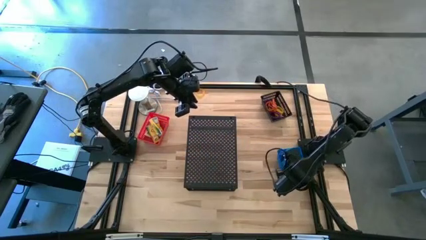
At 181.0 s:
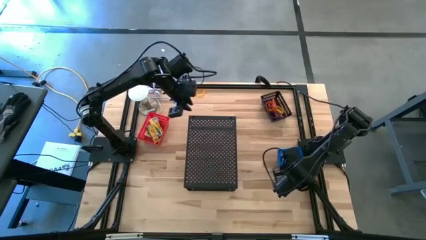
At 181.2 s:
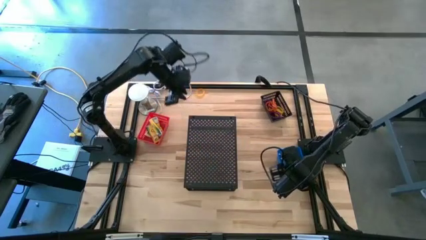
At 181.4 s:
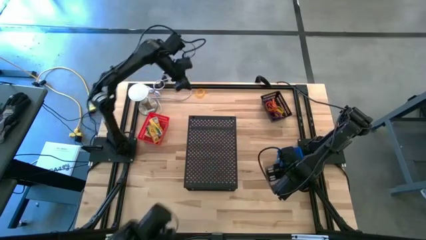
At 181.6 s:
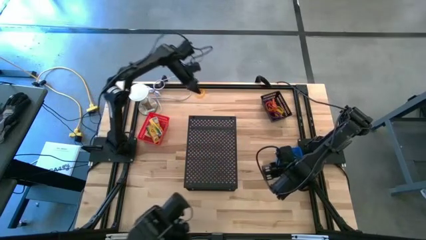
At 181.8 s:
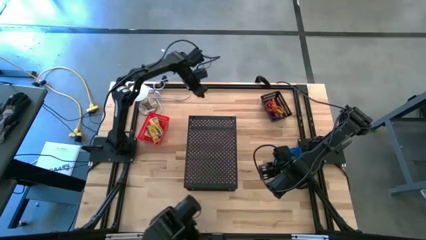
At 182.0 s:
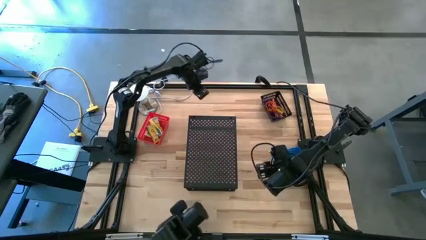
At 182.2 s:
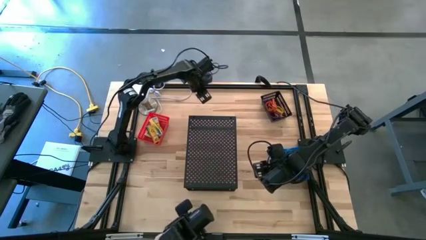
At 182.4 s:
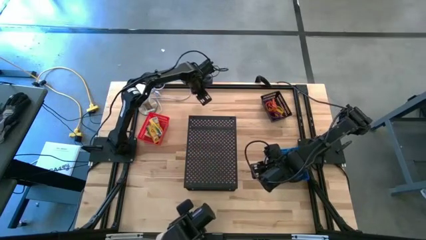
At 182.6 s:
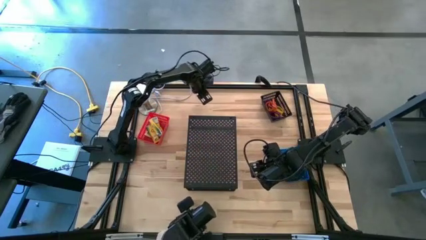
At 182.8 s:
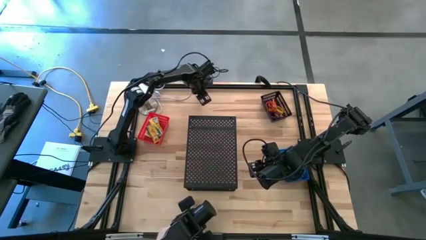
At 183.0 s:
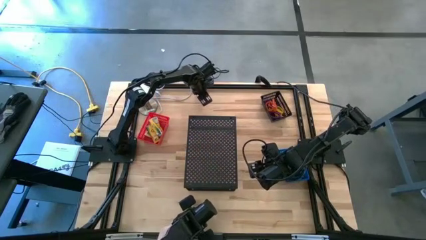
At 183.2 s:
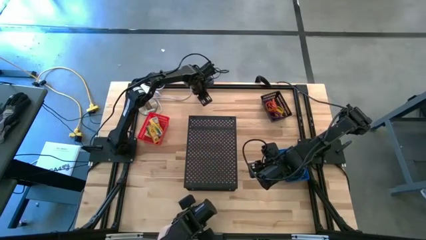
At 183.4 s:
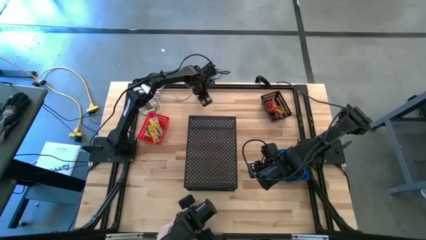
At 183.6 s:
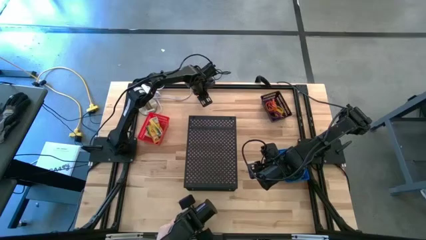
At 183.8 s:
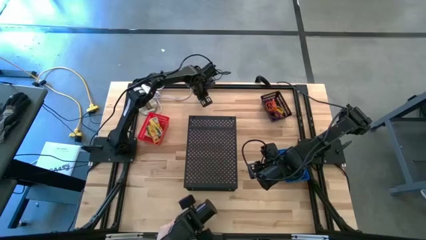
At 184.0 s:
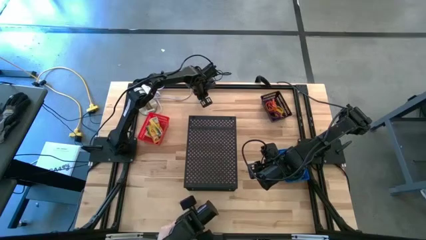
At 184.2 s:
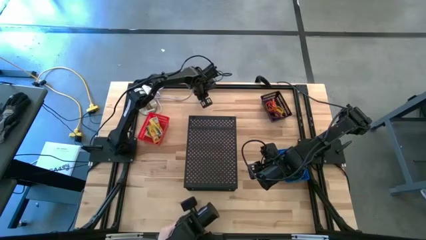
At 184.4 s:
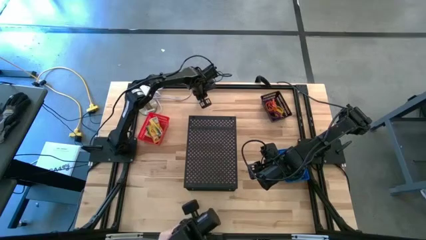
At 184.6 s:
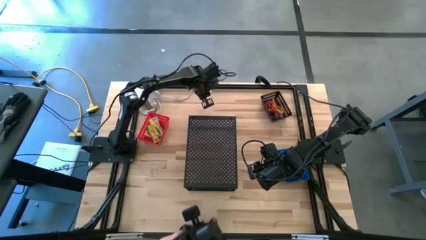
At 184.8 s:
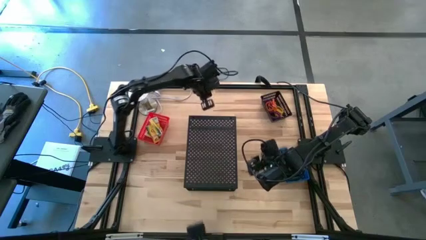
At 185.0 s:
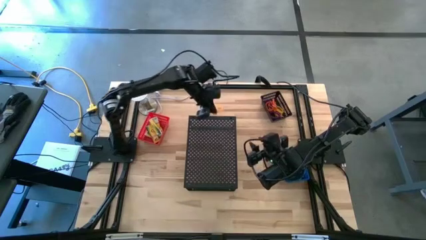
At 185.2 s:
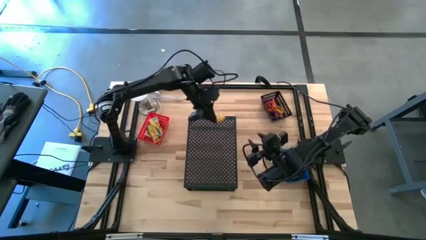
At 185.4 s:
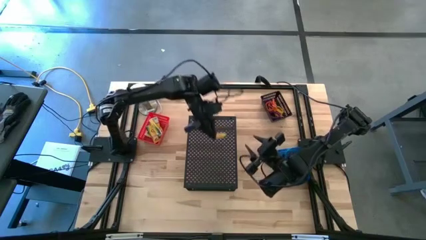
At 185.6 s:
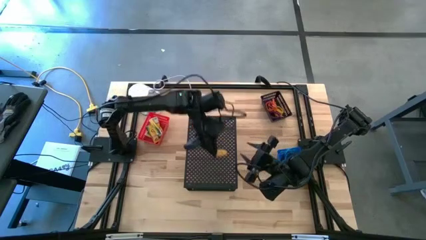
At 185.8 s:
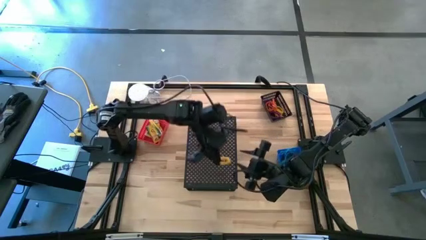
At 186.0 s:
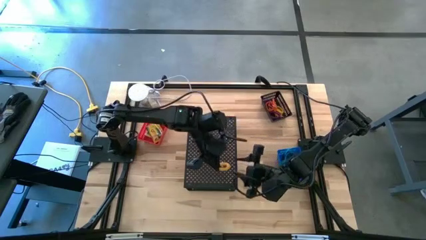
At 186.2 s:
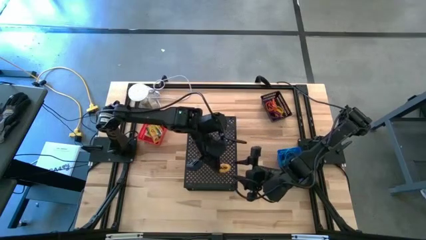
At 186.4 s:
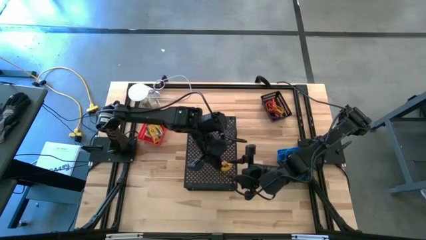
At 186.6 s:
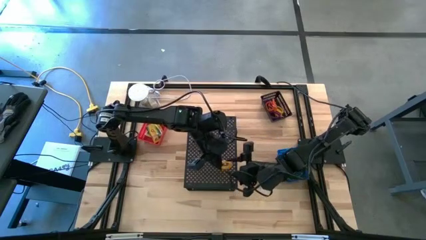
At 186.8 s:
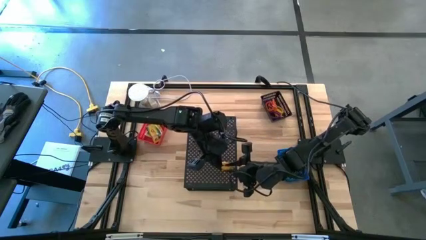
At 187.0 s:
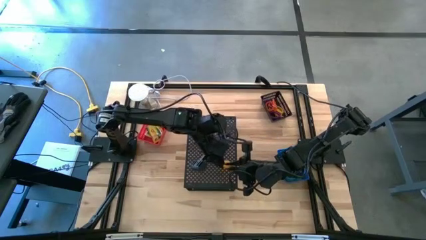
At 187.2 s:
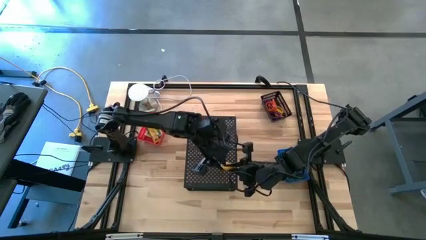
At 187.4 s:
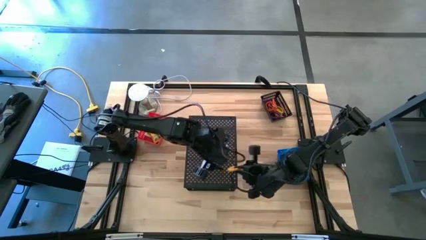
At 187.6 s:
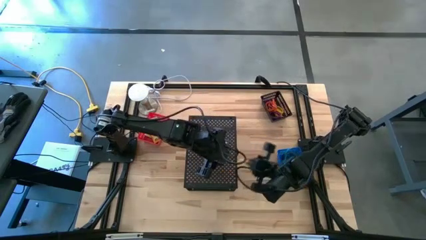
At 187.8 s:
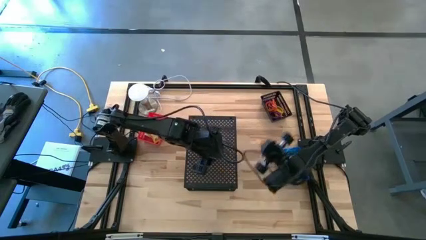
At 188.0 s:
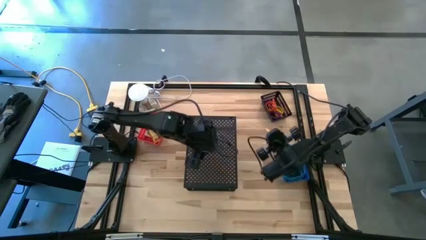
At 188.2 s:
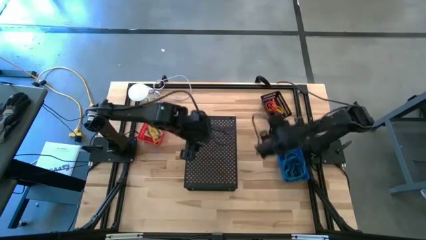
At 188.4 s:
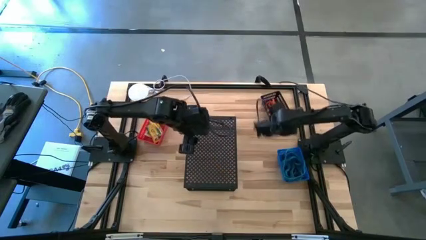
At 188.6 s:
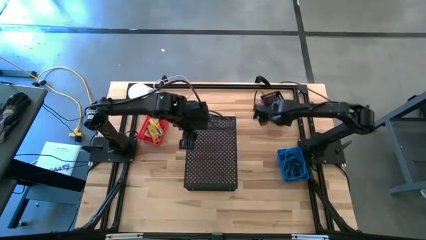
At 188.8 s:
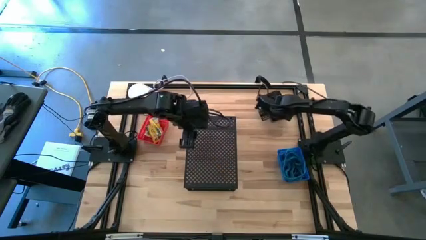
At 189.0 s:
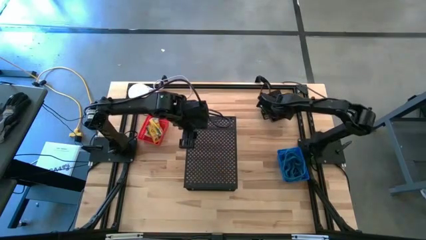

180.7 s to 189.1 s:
Task: Pick & Place Office Desk Supplies
Put the yellow spring keychain into the black bin

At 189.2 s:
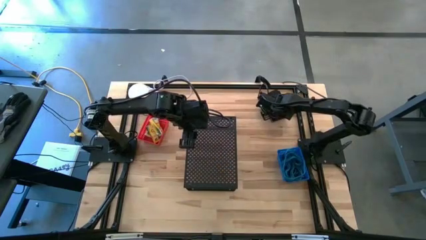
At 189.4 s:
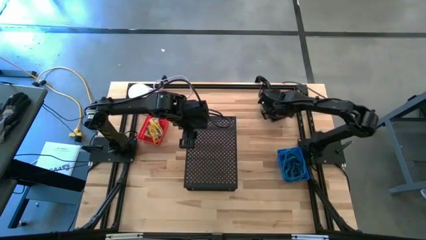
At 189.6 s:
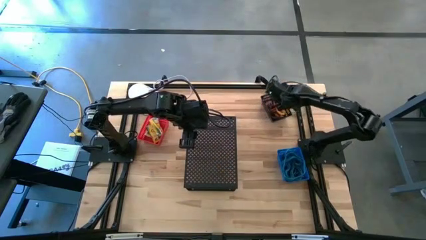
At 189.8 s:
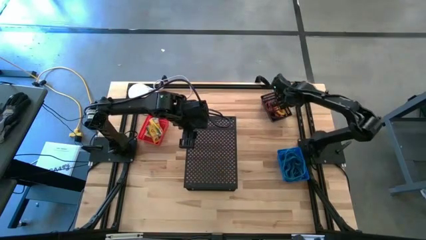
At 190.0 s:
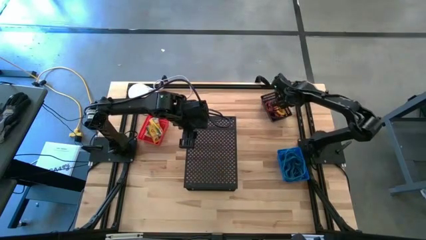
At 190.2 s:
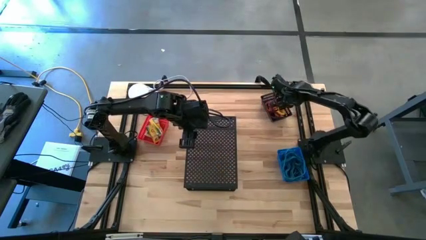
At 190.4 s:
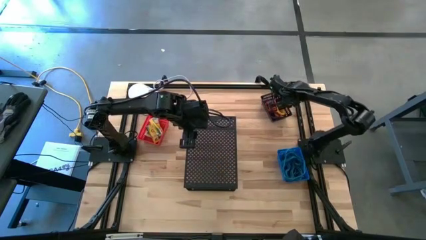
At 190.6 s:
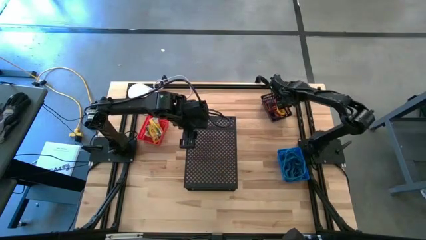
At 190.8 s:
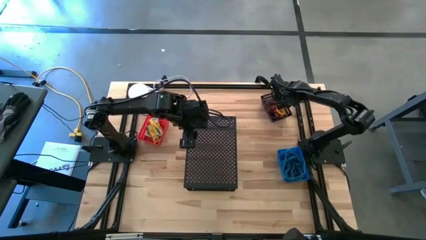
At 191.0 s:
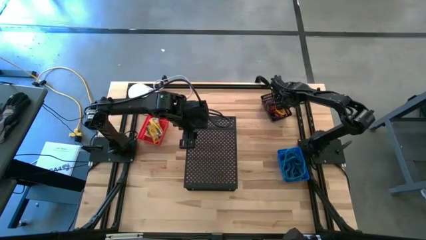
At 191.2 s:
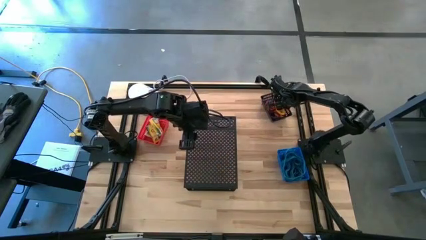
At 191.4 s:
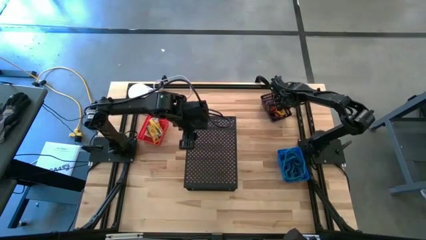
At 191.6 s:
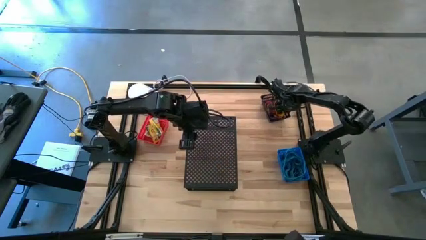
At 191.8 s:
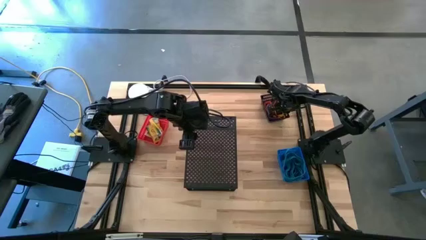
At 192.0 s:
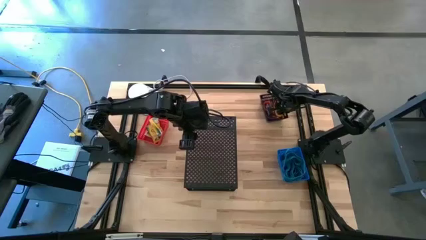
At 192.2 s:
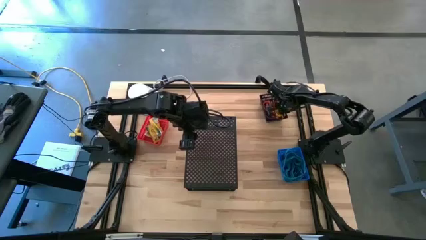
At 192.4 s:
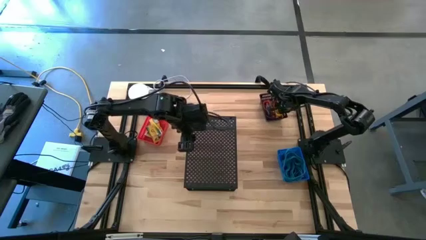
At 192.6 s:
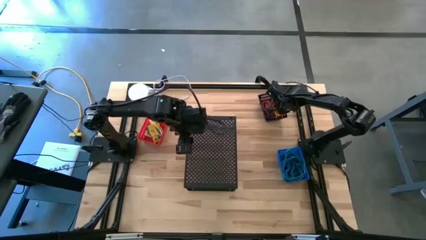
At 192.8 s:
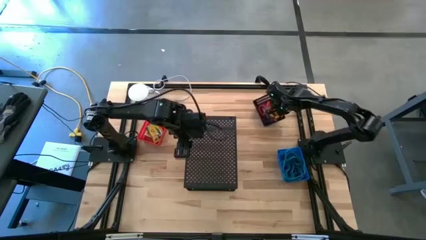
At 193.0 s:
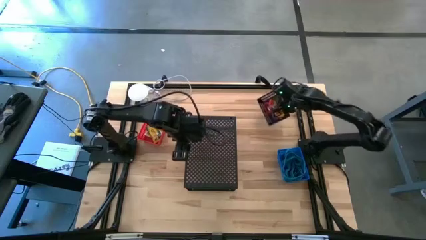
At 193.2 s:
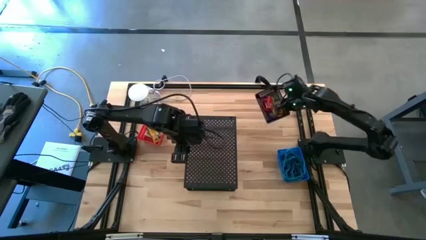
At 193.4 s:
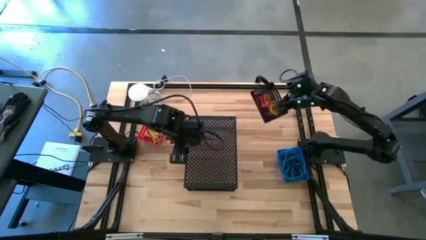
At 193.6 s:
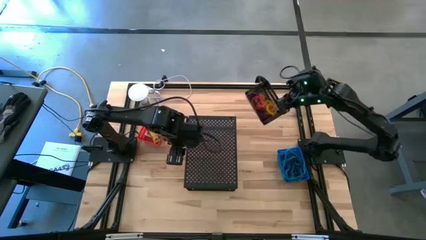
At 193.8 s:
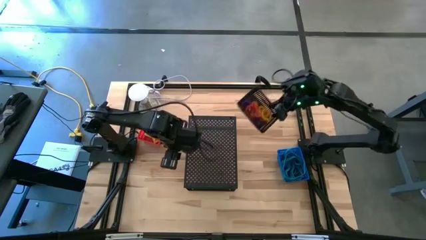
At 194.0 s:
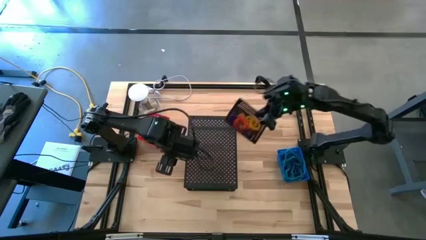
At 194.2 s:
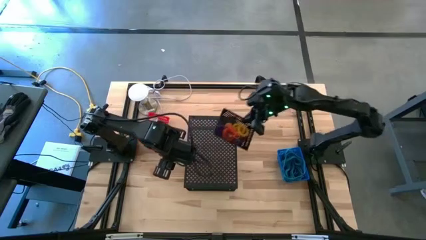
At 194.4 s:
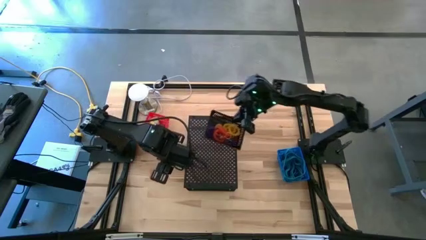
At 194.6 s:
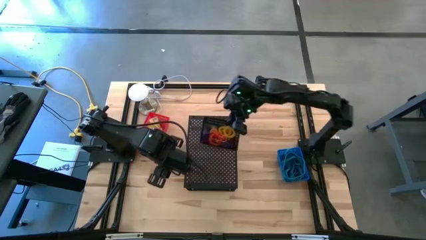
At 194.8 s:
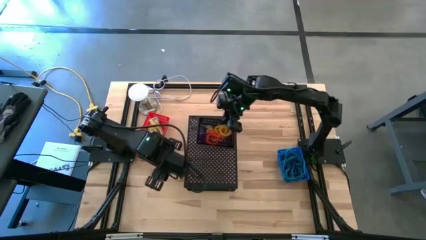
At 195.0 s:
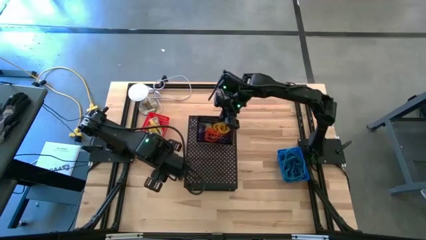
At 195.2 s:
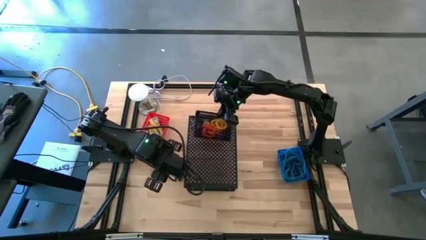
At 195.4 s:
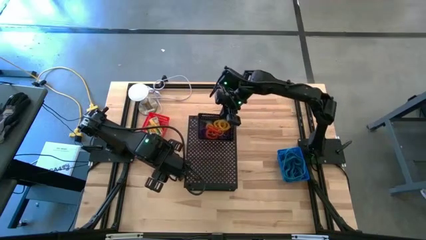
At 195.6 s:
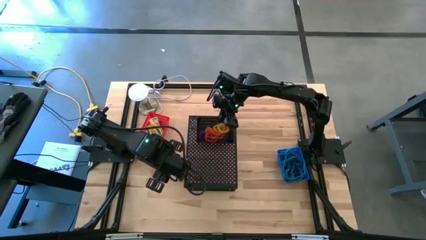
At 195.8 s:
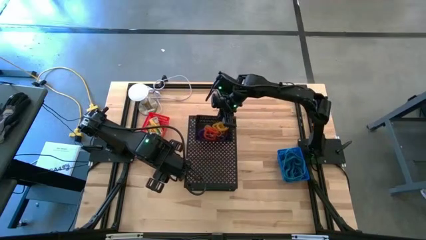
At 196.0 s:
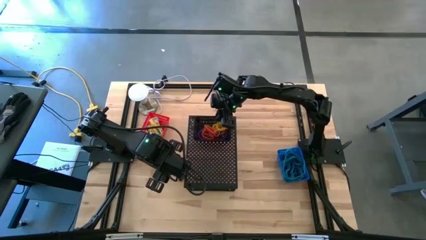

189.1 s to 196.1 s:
Put the black bin on the shelf
